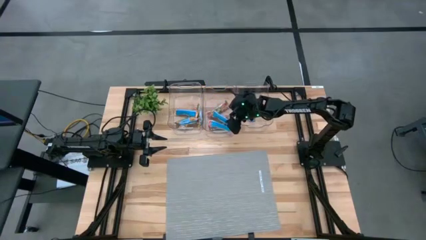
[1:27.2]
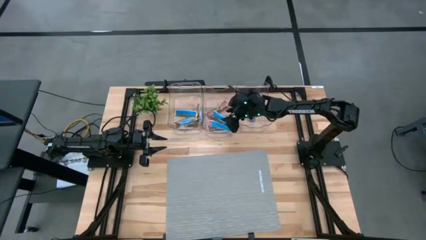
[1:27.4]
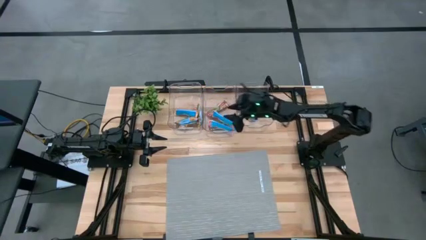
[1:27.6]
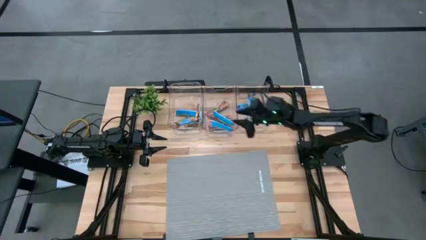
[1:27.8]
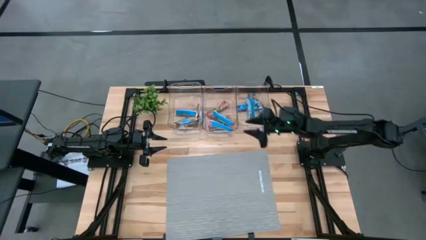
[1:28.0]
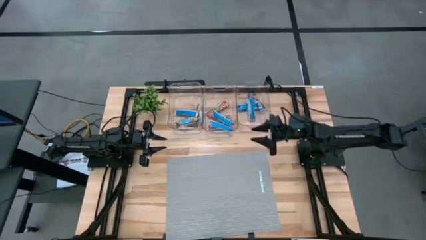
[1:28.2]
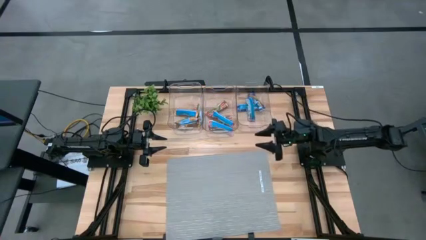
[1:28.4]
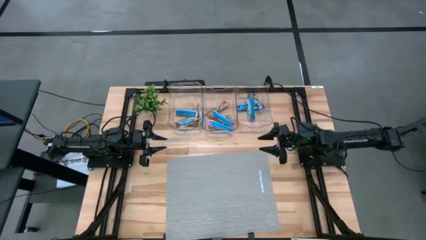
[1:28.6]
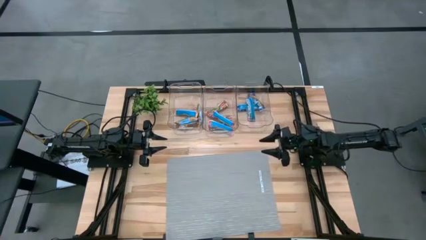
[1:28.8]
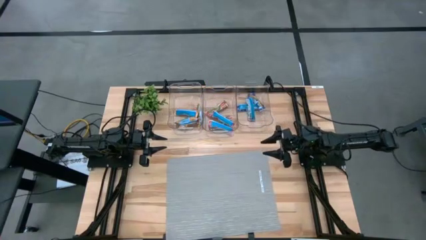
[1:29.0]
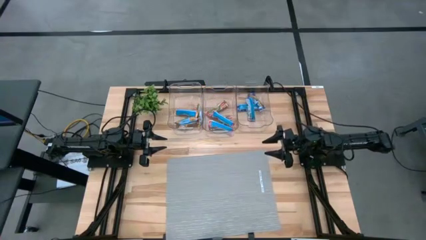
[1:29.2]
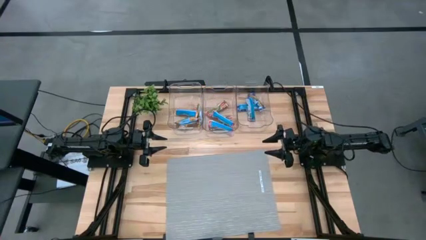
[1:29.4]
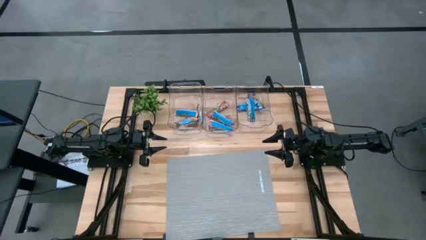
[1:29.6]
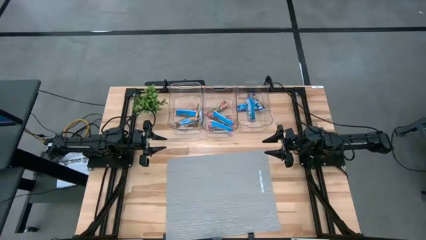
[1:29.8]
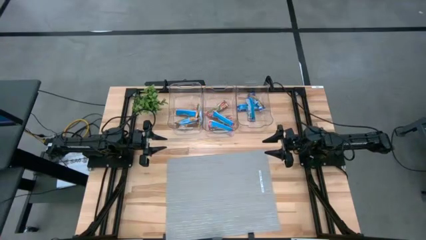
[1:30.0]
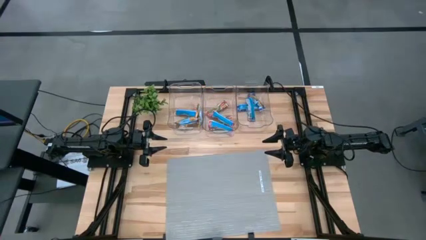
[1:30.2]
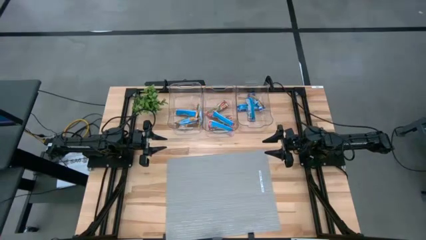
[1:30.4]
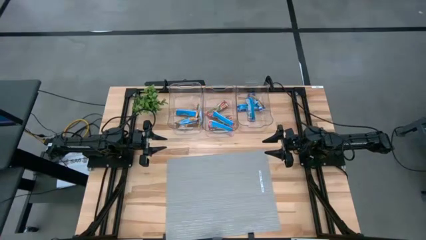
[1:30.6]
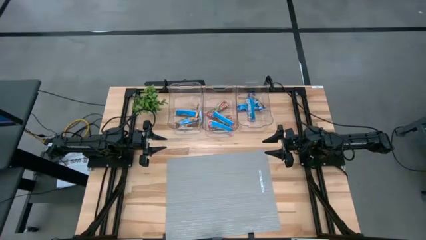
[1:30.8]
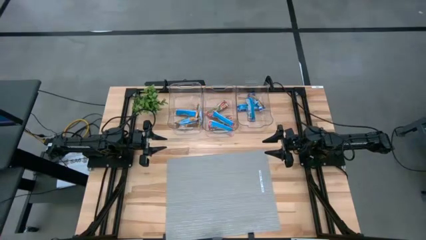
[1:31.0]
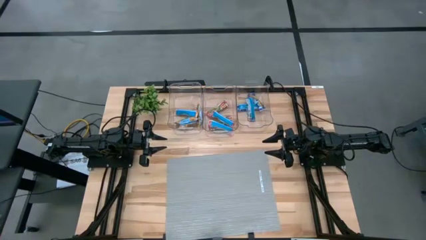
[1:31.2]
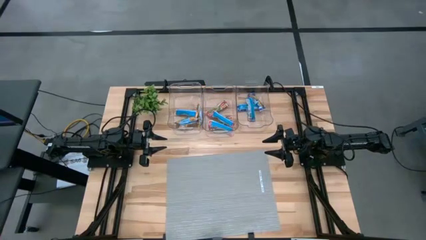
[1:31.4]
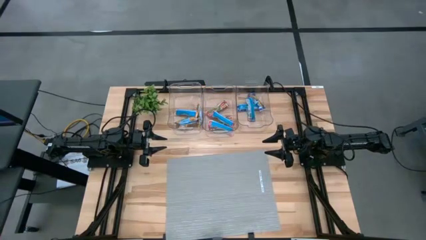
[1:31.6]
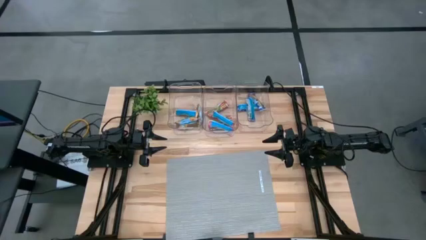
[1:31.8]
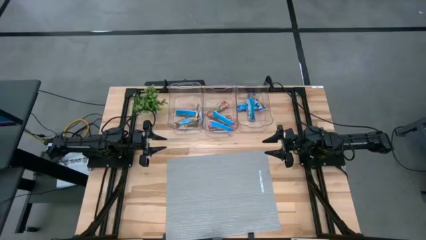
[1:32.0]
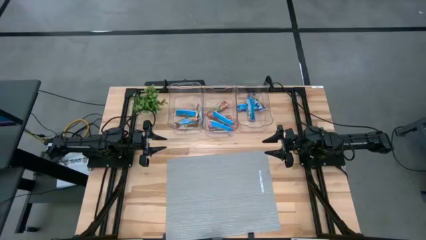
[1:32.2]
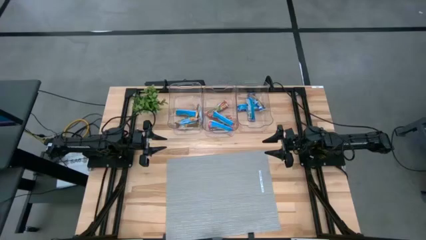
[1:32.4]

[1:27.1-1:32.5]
Task: Pick and place Granola Bars by type
Return to Home Position

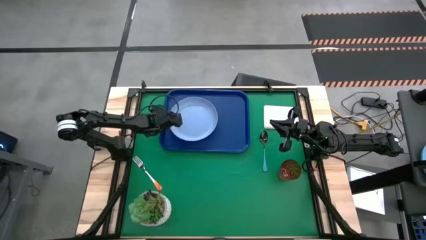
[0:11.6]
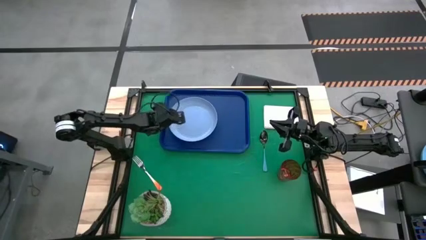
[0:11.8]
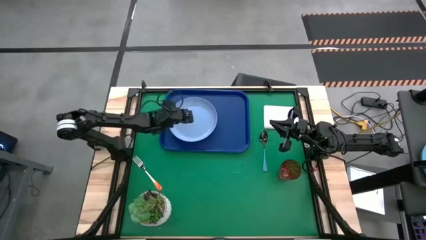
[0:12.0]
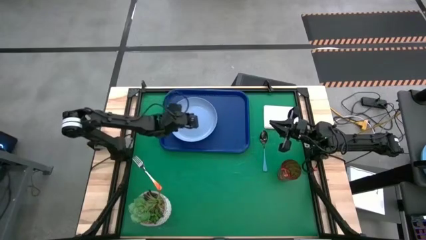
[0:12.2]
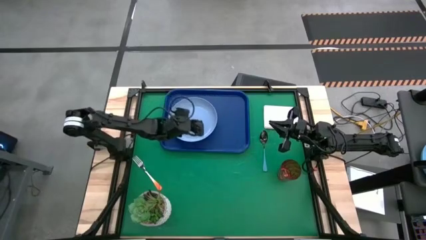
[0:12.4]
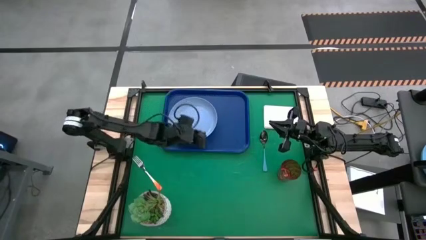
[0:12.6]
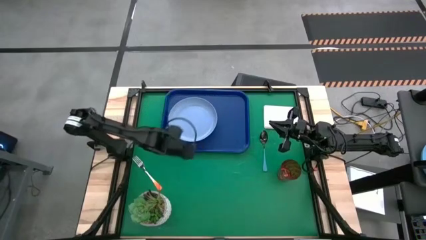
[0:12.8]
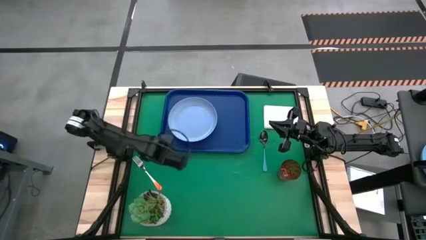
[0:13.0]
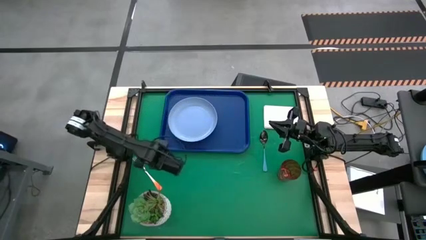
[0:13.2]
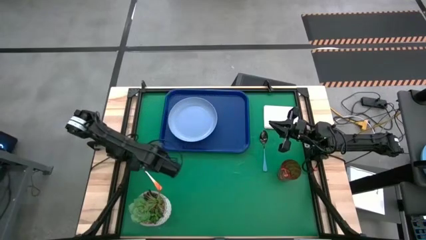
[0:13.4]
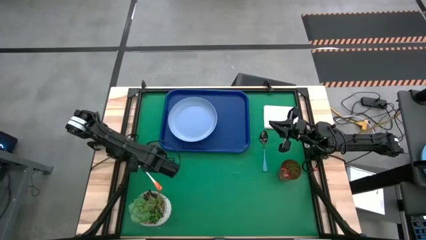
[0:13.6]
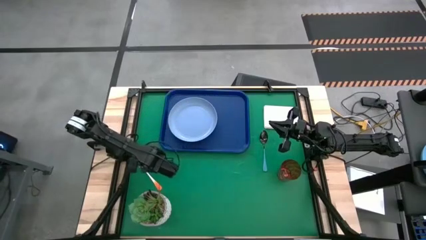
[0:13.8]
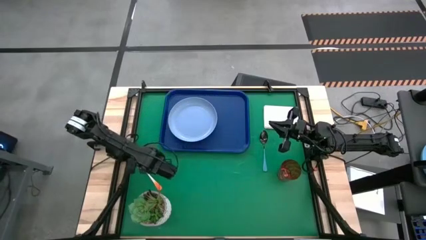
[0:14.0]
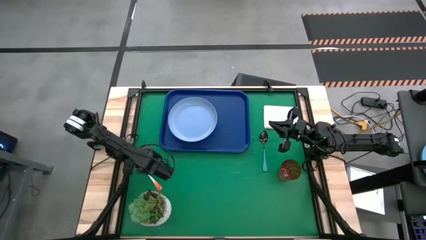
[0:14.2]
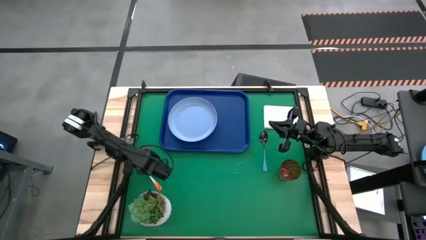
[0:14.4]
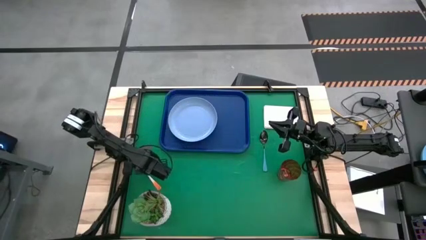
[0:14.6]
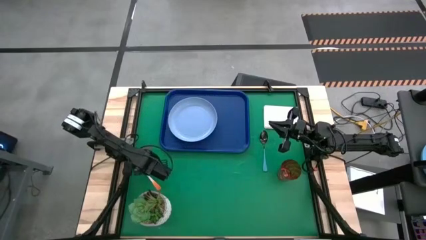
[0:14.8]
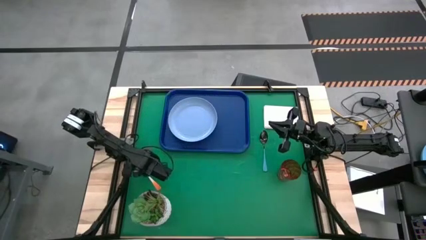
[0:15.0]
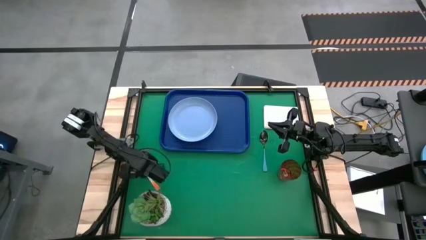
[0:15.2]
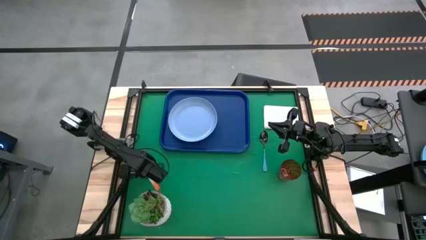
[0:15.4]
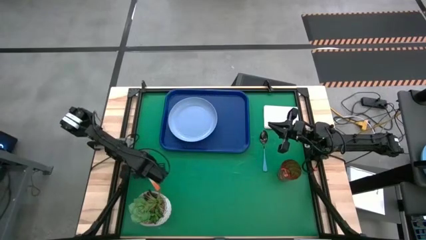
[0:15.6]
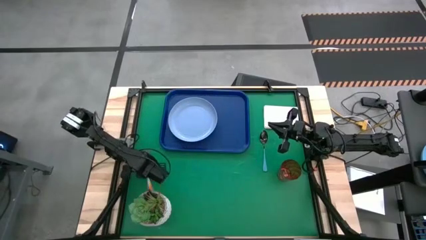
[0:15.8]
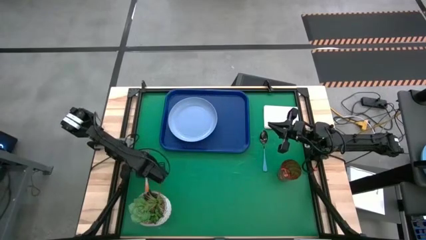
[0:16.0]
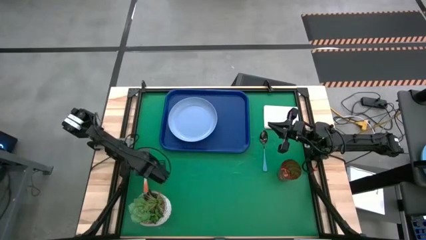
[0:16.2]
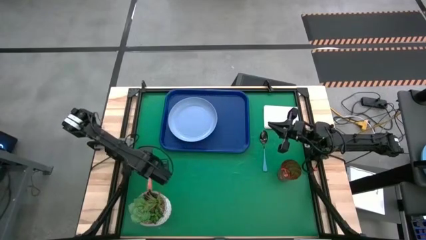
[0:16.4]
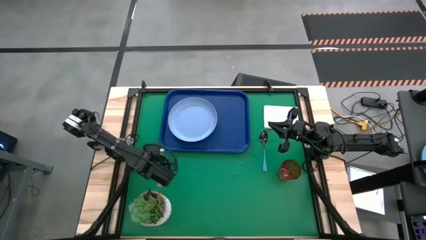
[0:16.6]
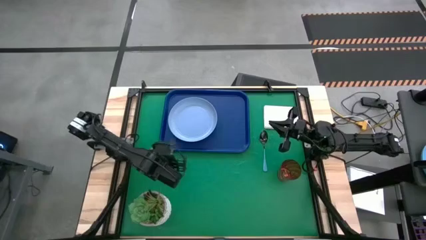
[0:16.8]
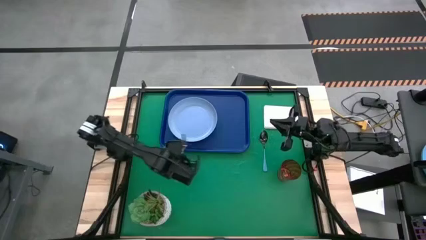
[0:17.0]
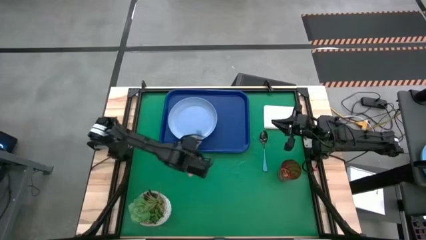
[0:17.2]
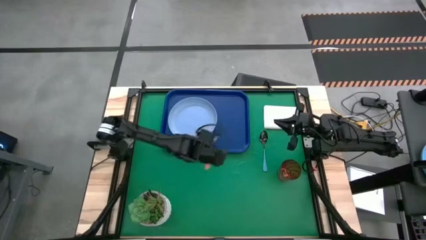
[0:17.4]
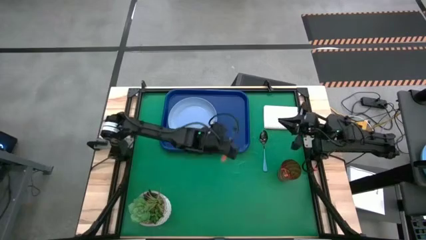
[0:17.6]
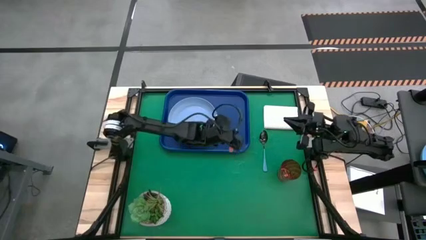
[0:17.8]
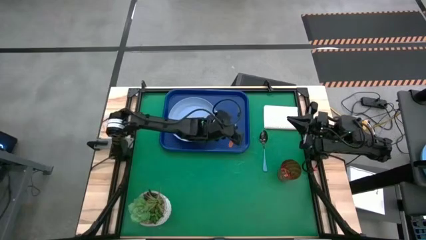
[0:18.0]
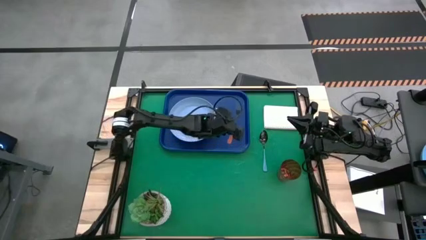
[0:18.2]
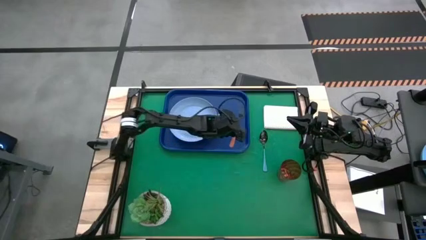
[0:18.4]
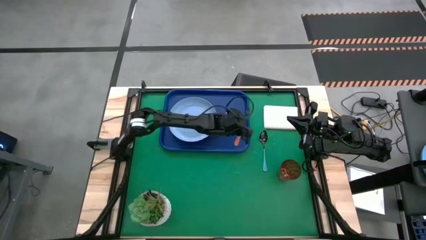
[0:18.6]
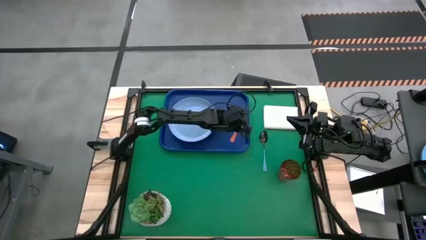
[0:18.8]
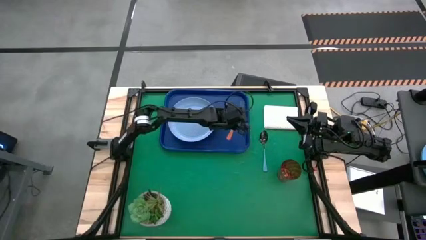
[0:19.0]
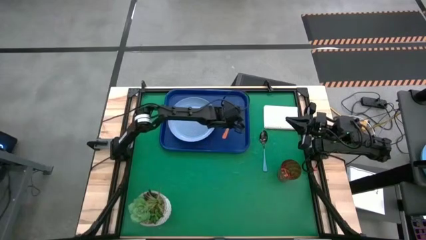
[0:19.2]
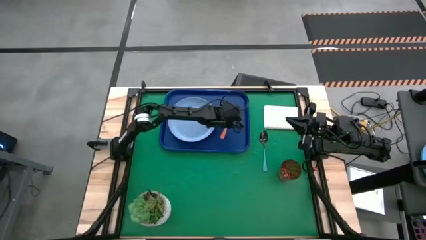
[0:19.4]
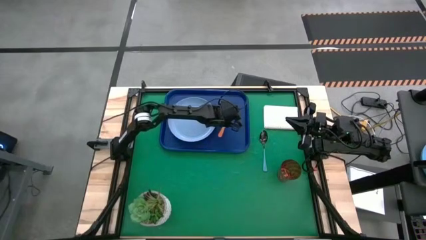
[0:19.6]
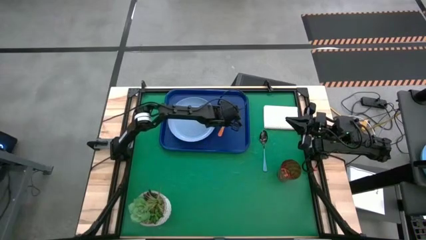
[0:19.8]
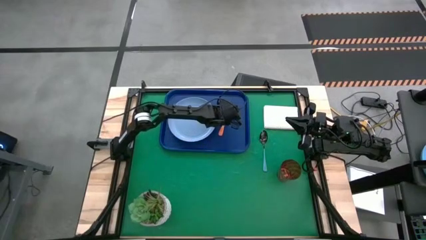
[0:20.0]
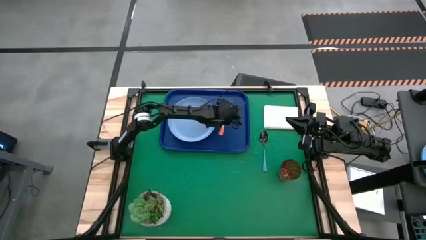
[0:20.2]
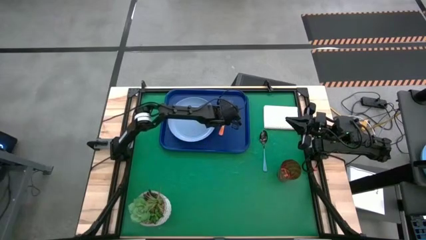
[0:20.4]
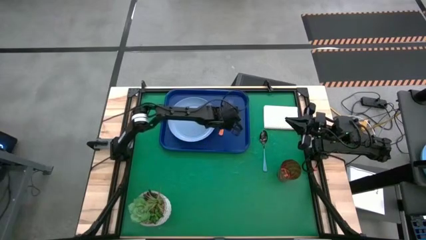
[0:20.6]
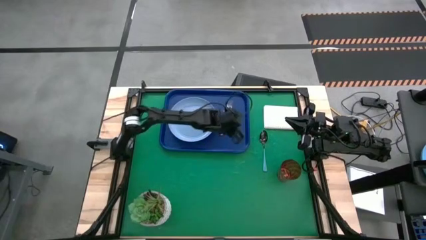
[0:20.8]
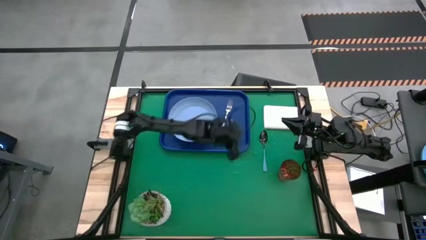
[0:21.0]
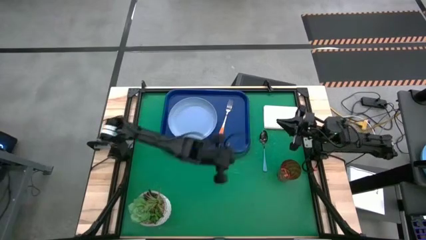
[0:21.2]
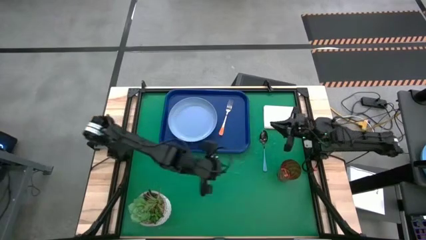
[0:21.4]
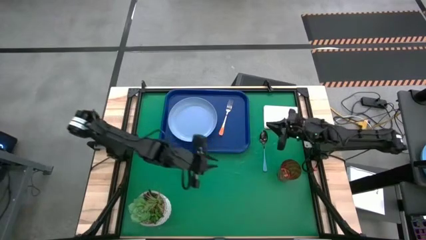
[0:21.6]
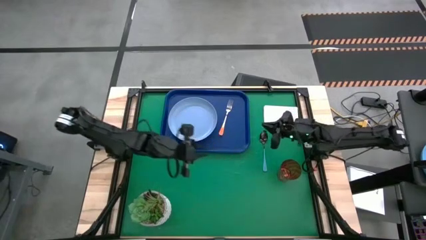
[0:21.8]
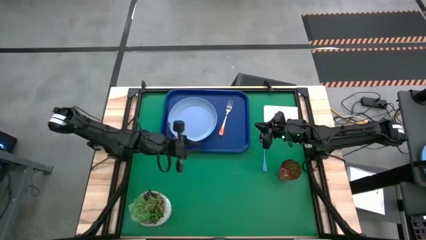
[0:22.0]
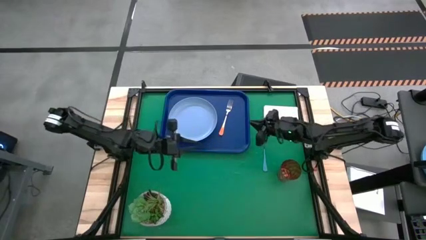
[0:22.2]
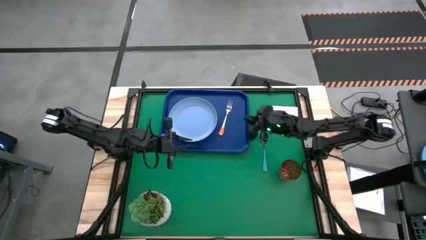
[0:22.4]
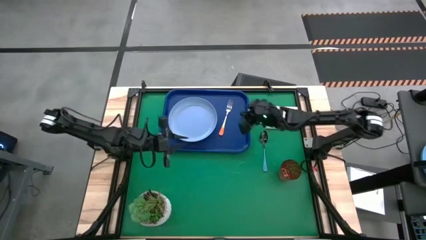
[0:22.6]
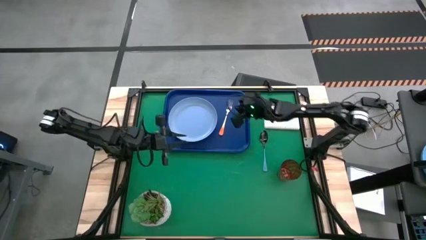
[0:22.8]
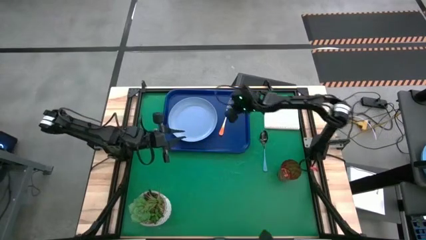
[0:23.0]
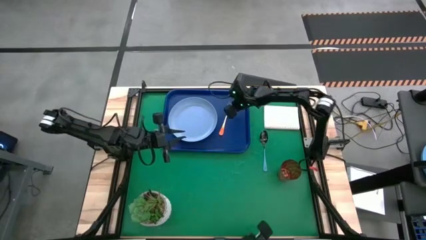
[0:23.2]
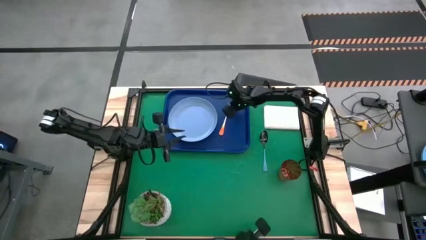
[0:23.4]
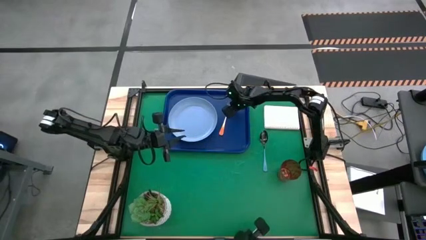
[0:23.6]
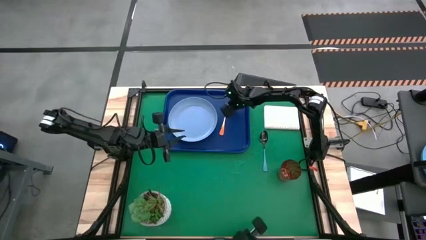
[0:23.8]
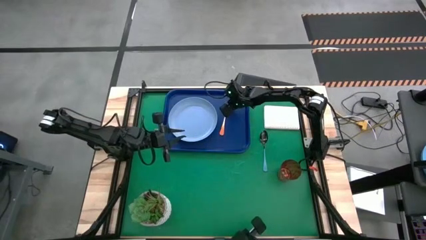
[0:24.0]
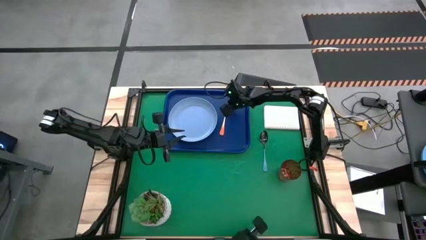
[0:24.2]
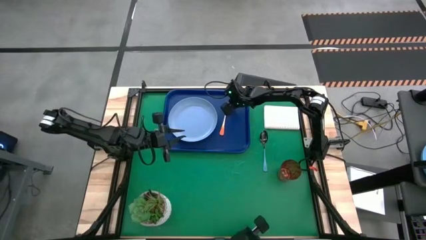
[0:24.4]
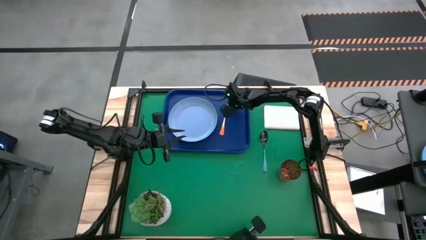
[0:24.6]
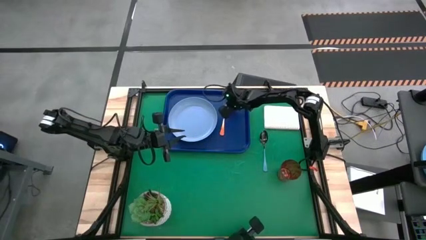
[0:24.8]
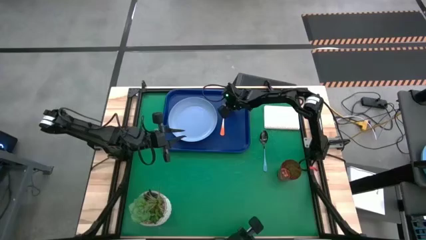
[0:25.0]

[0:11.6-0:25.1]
Task: Pick and place plate/cup/fork/spoon on tray
Put the orange fork on the blue tray to the right of the blue plate
